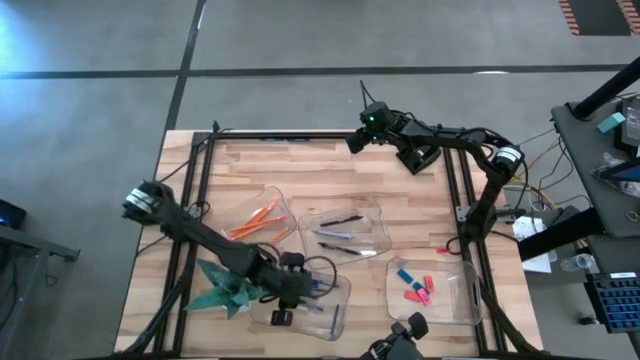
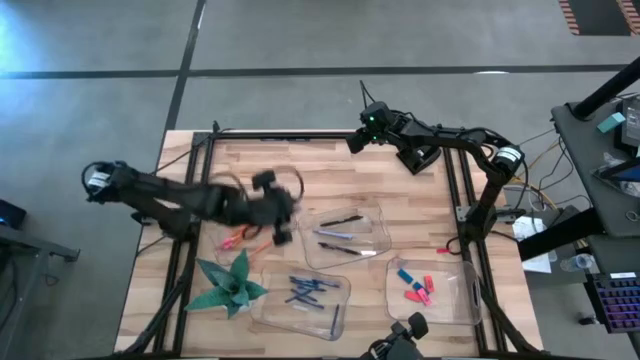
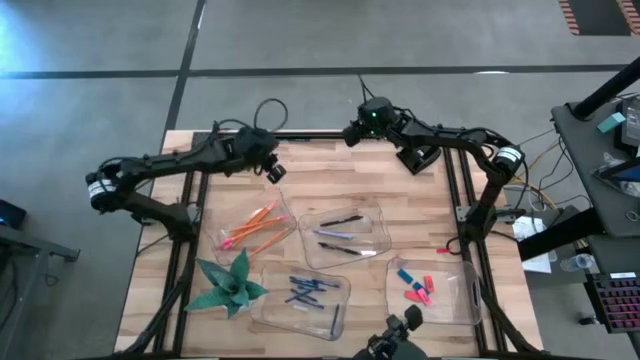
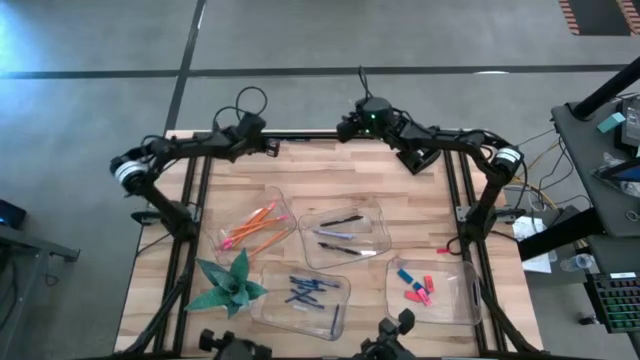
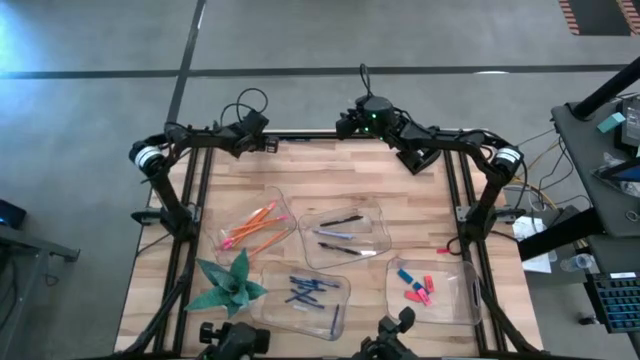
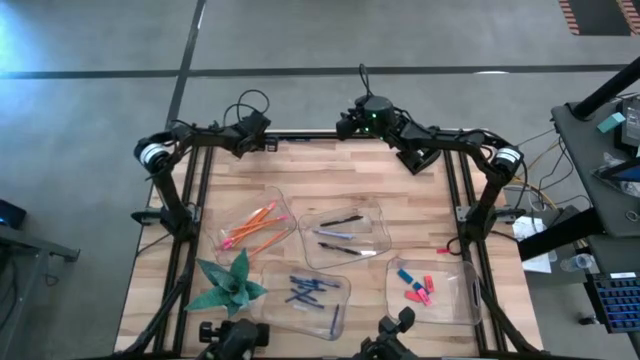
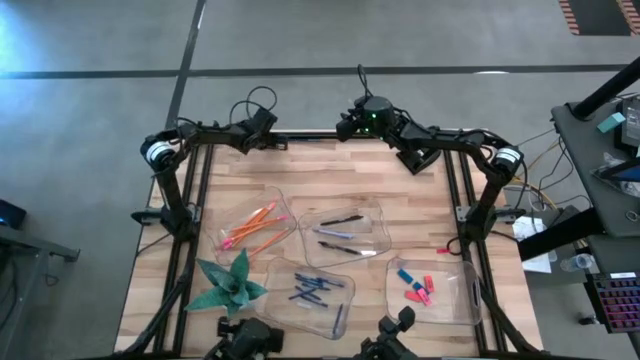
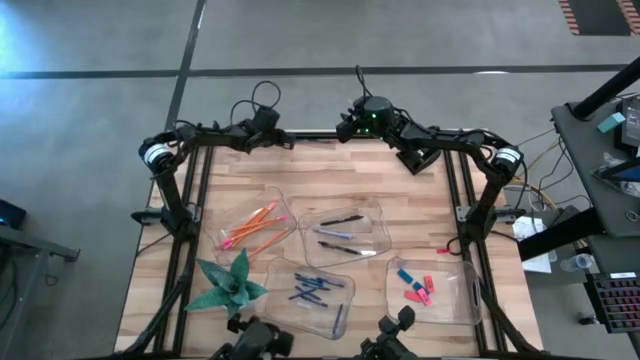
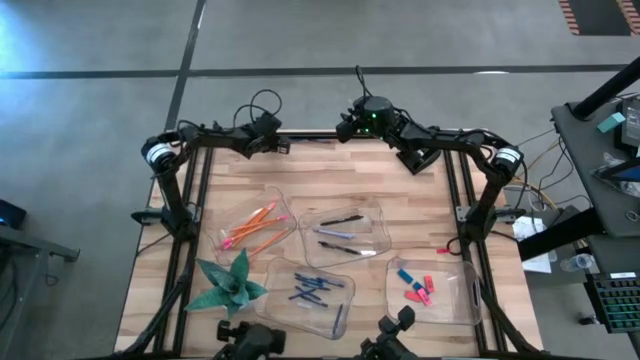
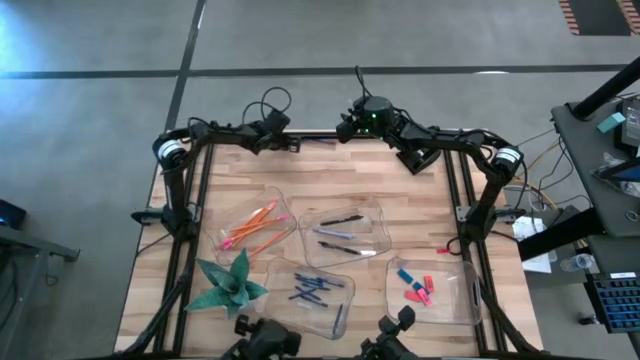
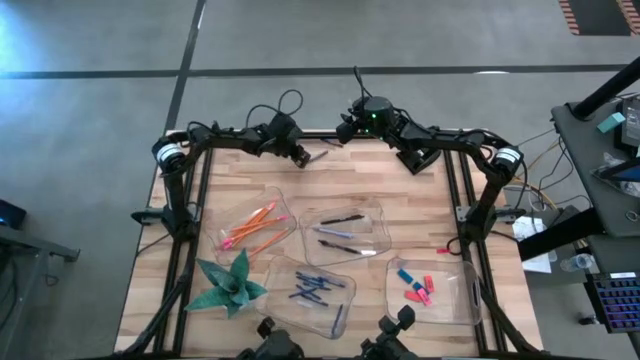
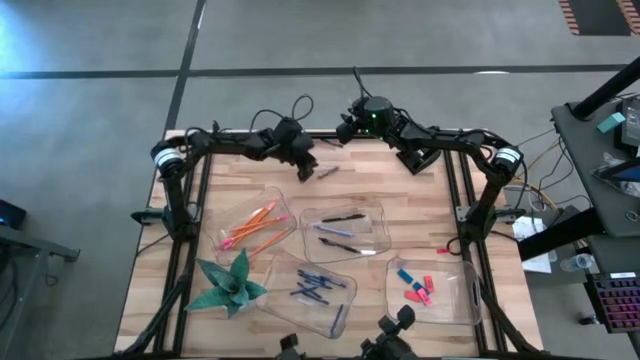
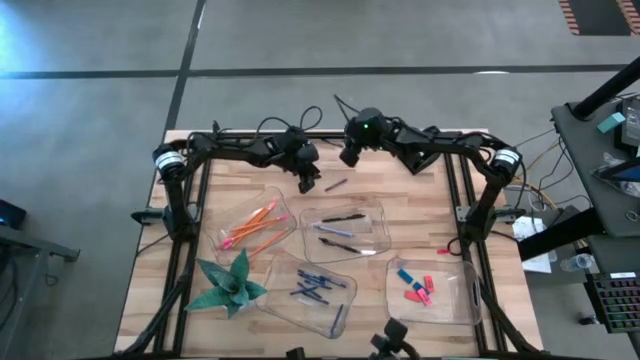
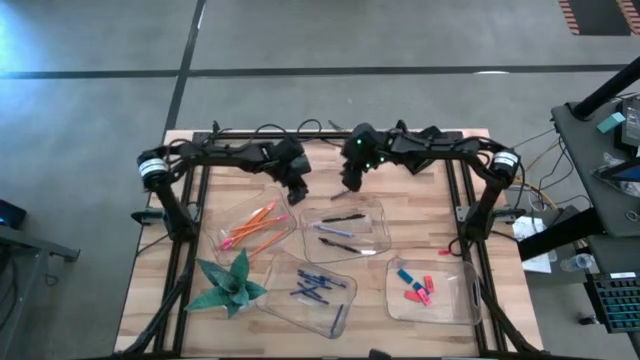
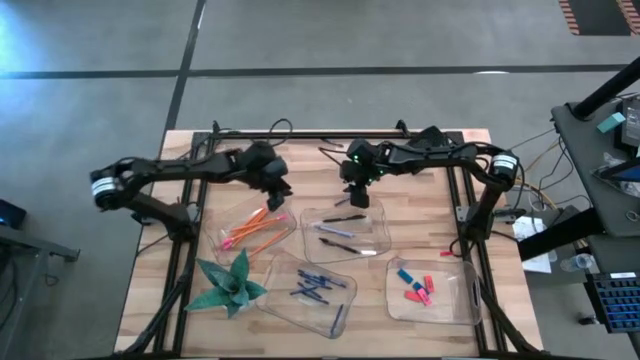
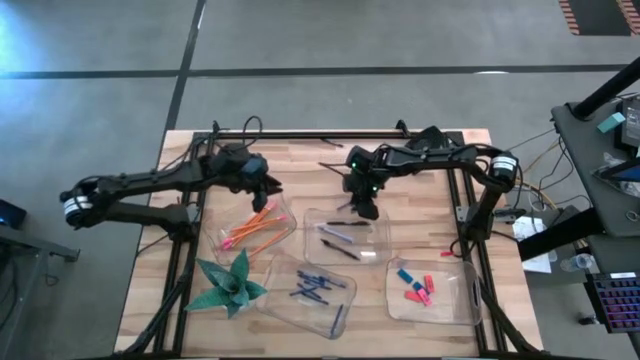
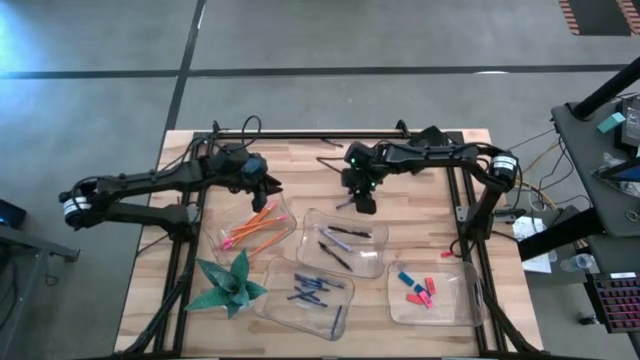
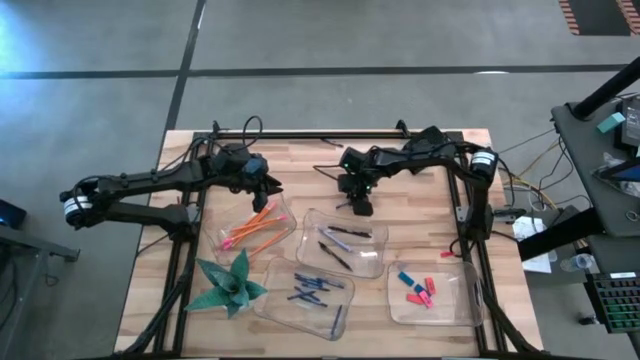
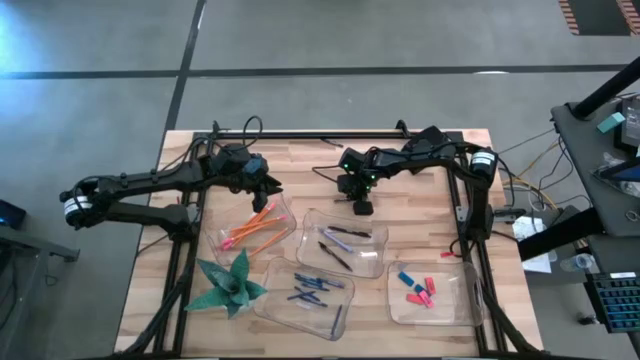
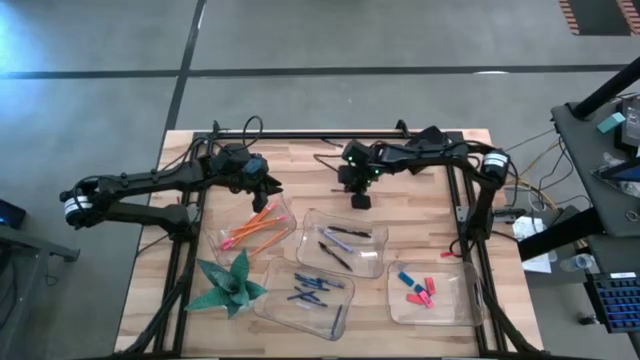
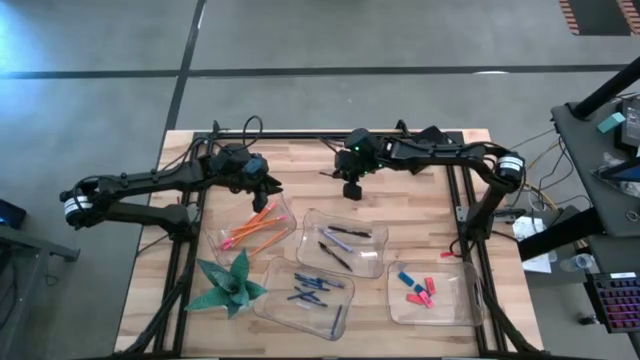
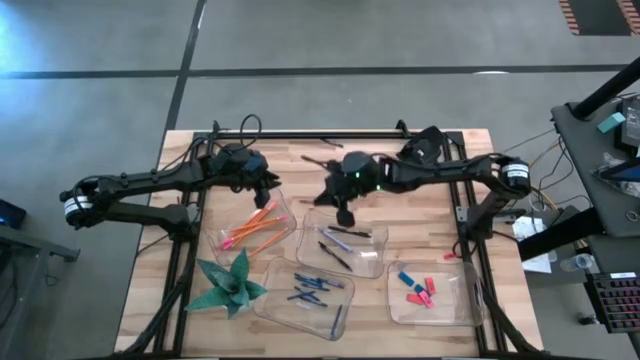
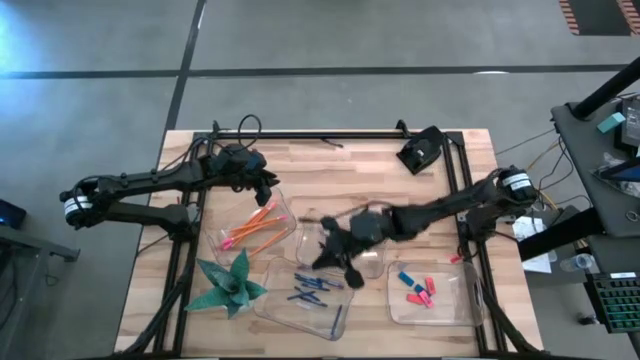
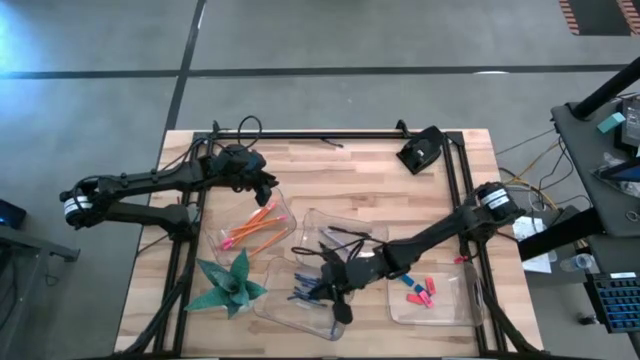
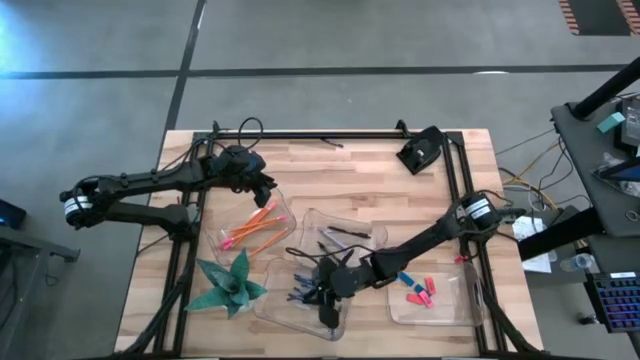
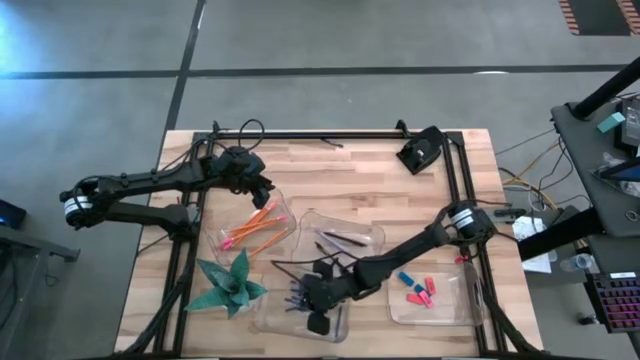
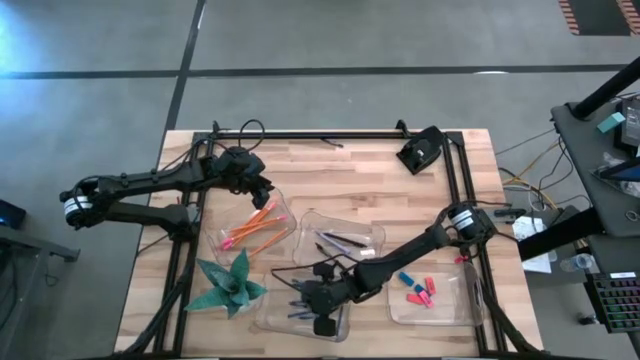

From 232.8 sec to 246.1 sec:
Task: Sort crayons/erasers/pens/pencils in bins
Put the blue crayon into the bottom left transparent bin

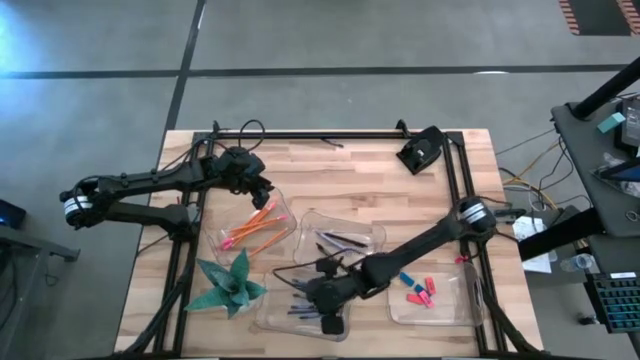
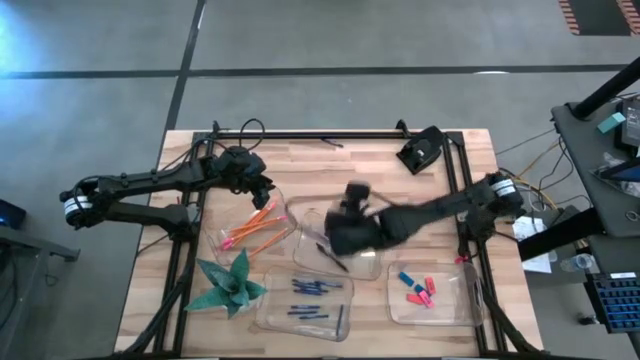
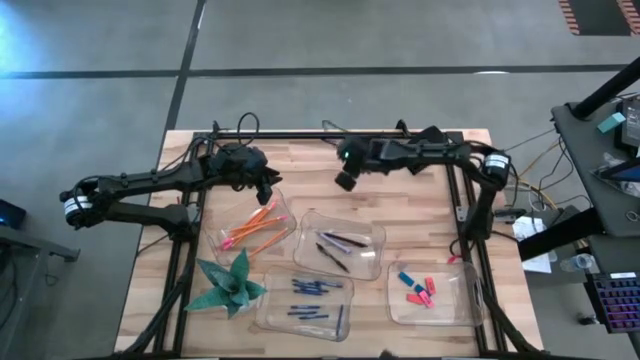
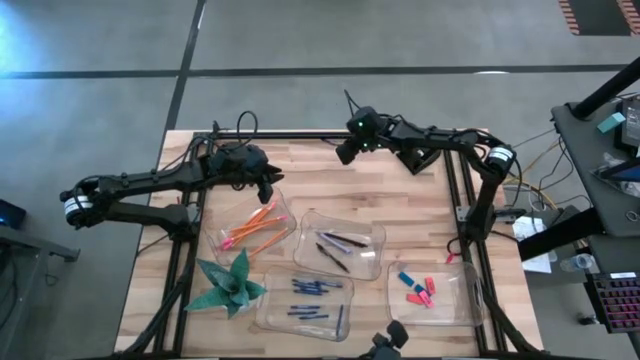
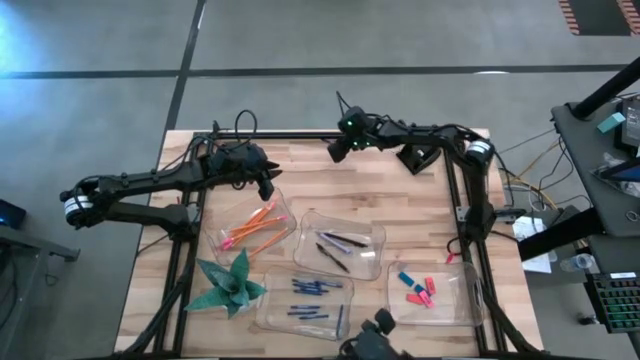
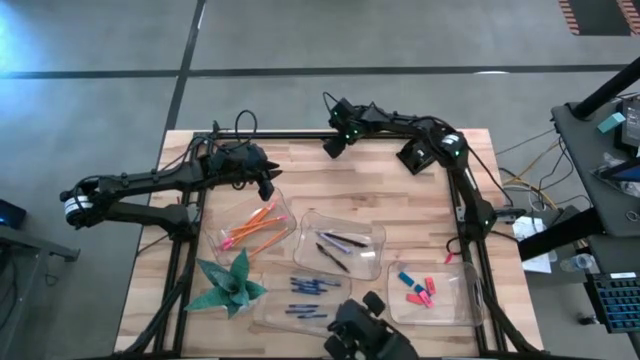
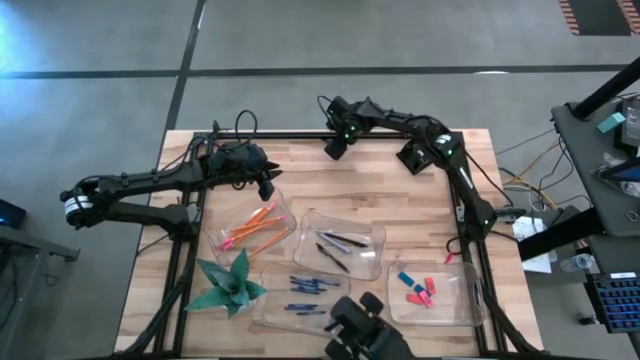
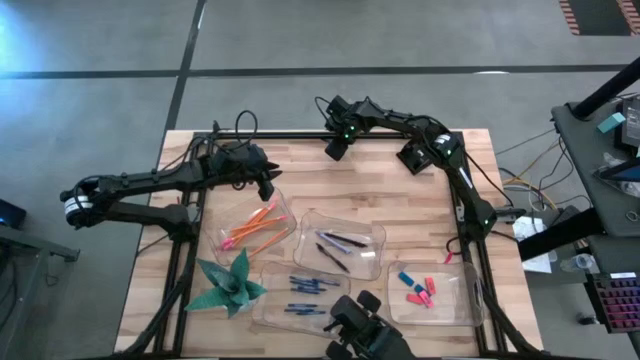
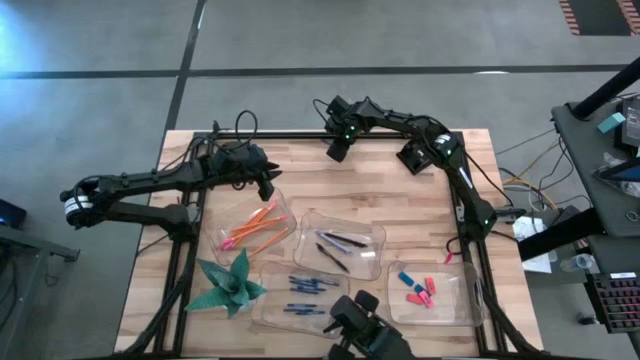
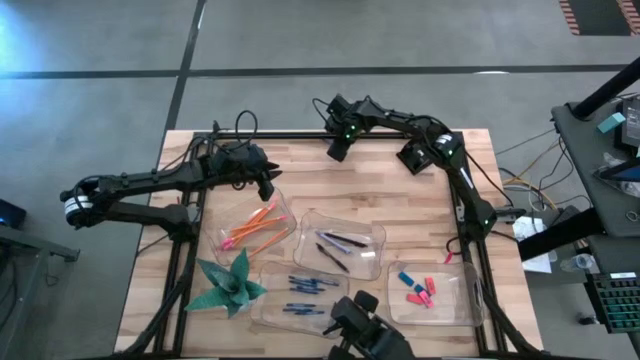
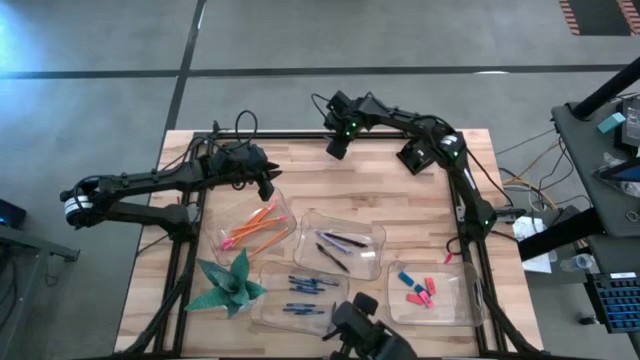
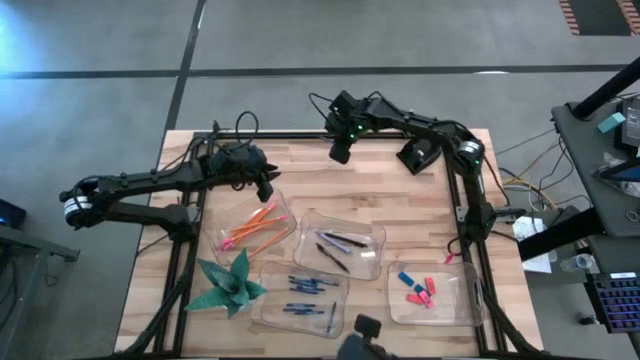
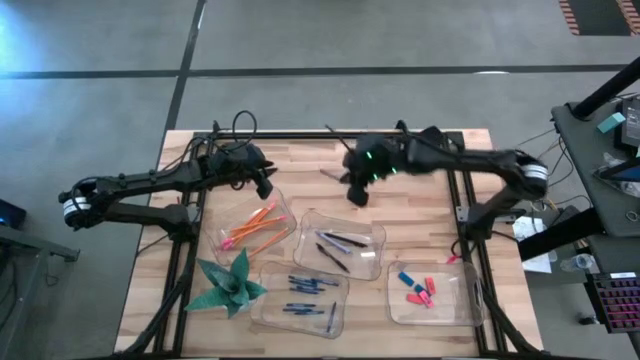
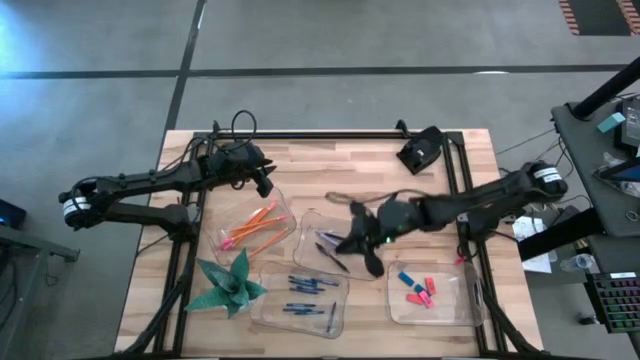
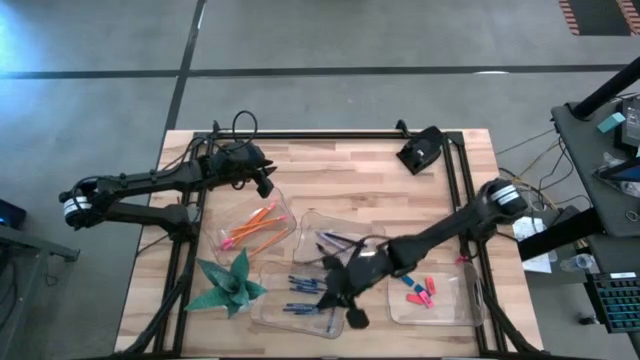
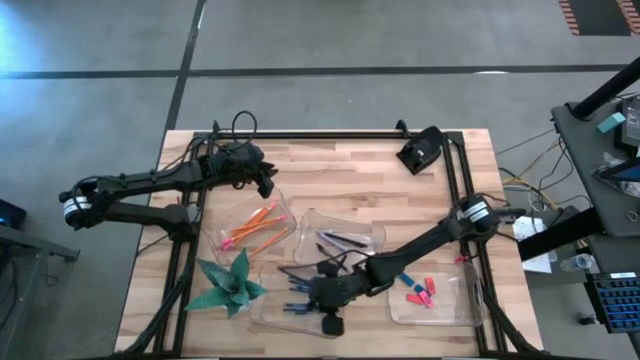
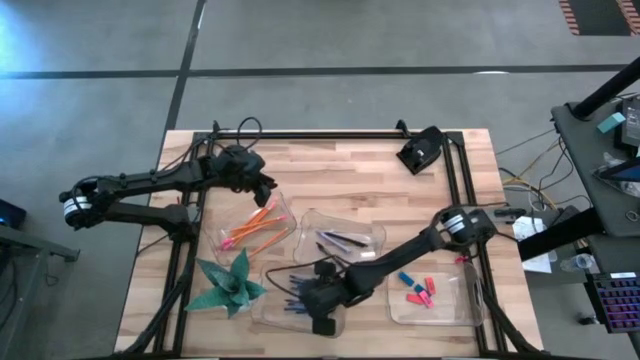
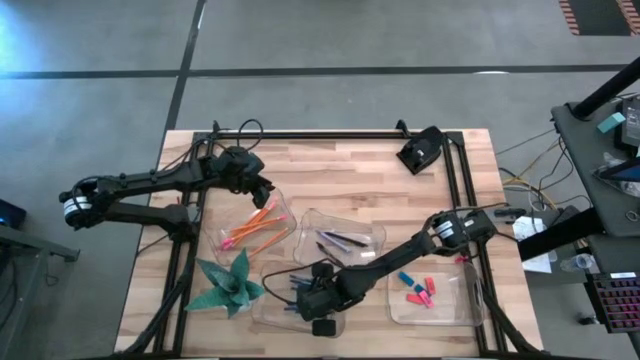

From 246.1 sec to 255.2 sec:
Put the blue crayon into the bottom left transparent bin
